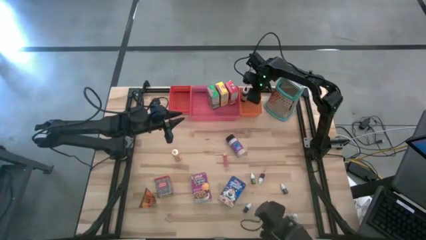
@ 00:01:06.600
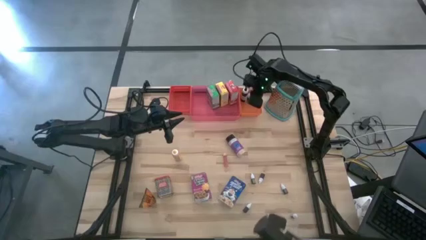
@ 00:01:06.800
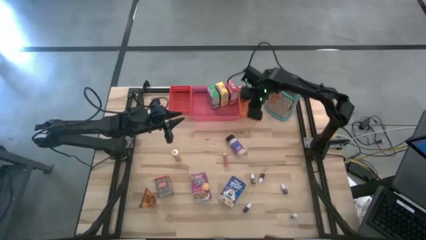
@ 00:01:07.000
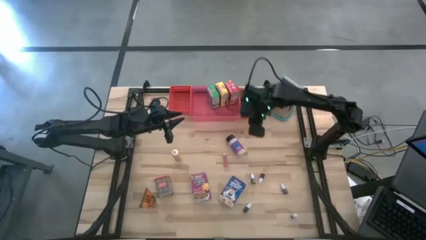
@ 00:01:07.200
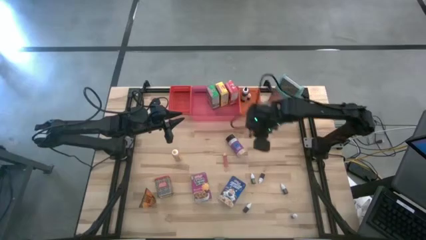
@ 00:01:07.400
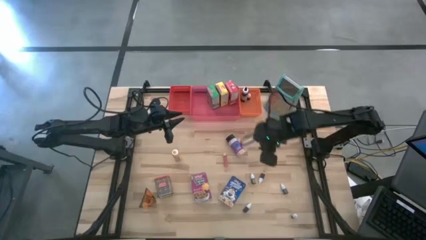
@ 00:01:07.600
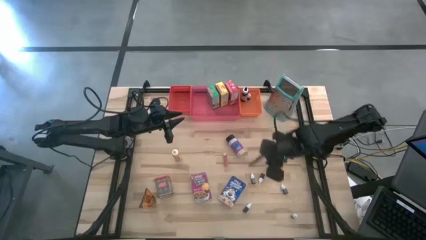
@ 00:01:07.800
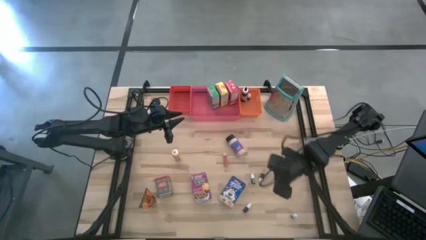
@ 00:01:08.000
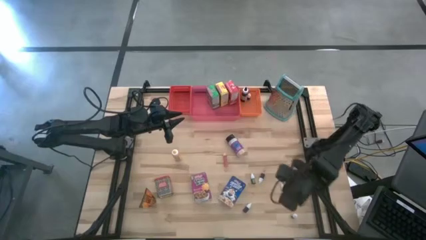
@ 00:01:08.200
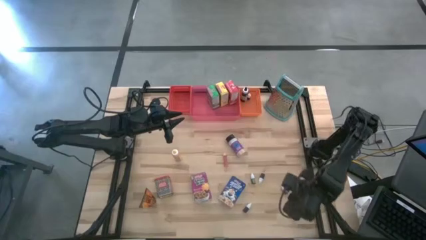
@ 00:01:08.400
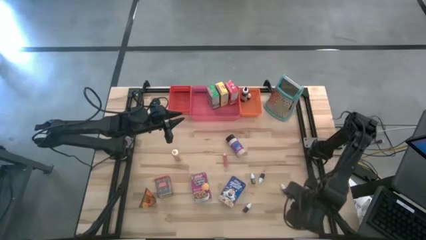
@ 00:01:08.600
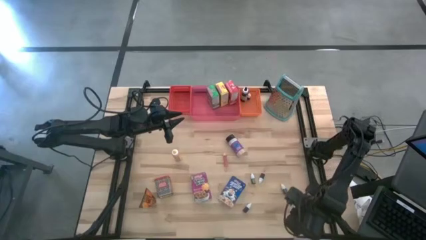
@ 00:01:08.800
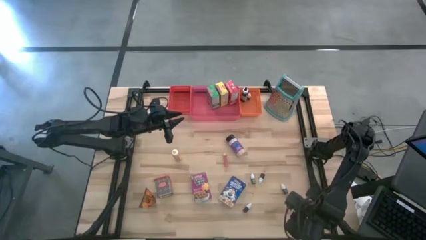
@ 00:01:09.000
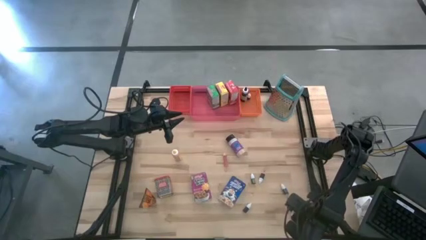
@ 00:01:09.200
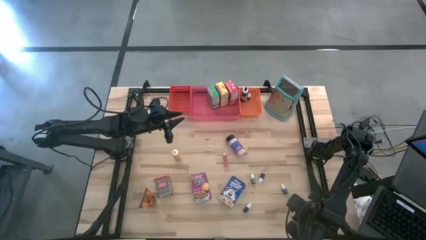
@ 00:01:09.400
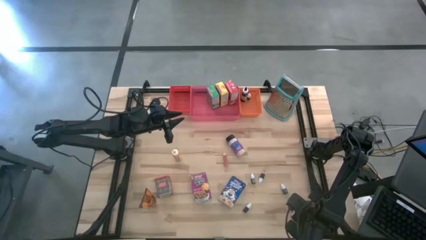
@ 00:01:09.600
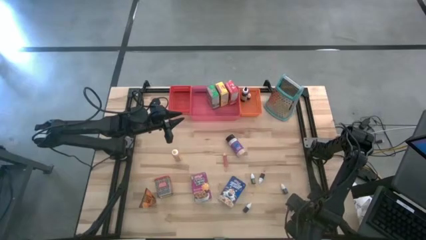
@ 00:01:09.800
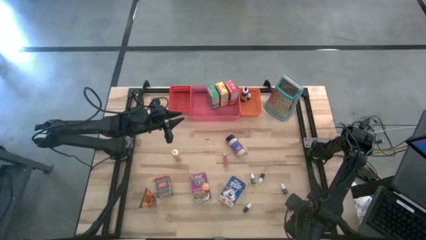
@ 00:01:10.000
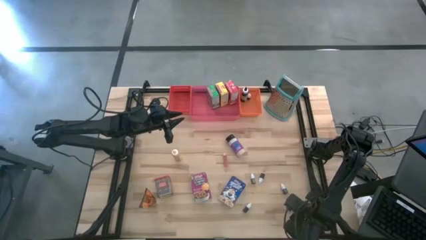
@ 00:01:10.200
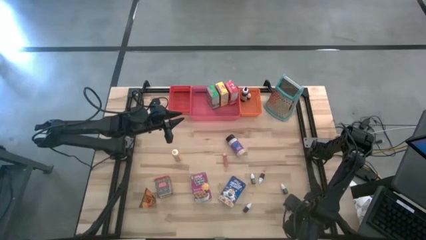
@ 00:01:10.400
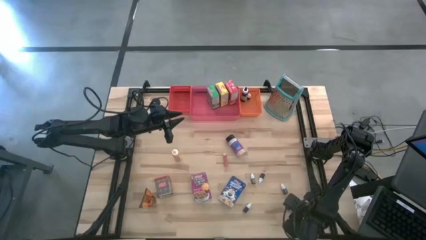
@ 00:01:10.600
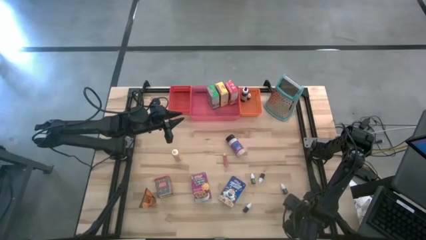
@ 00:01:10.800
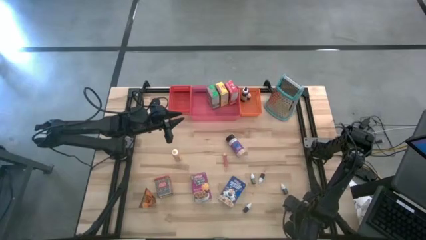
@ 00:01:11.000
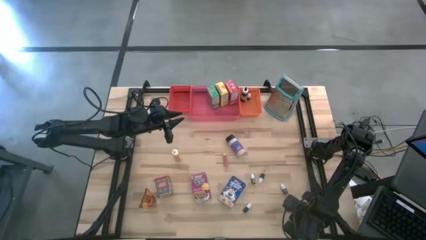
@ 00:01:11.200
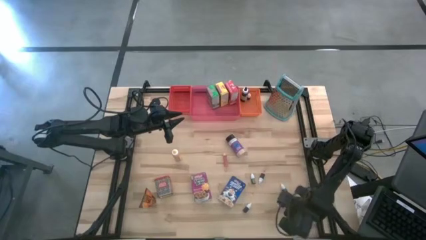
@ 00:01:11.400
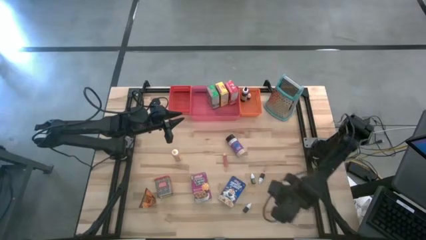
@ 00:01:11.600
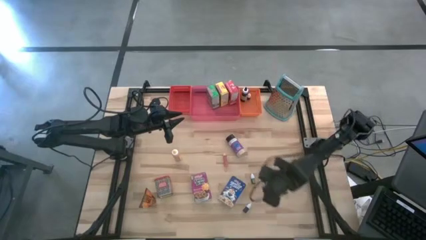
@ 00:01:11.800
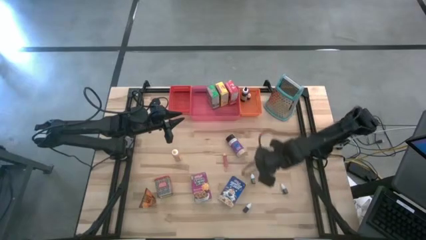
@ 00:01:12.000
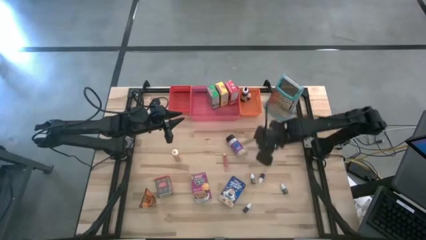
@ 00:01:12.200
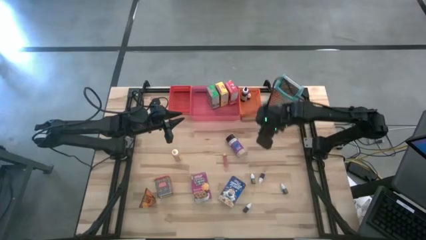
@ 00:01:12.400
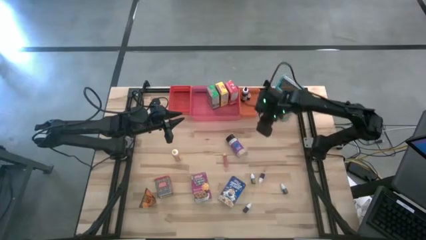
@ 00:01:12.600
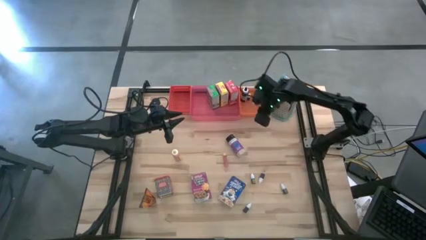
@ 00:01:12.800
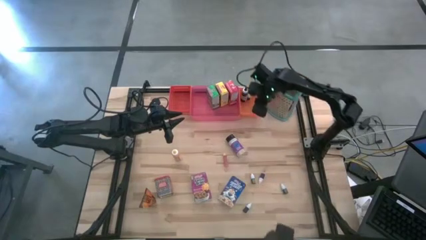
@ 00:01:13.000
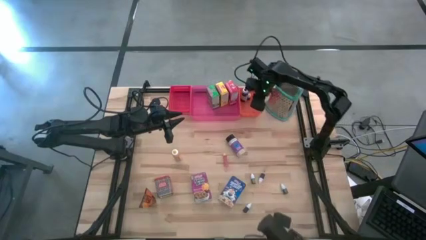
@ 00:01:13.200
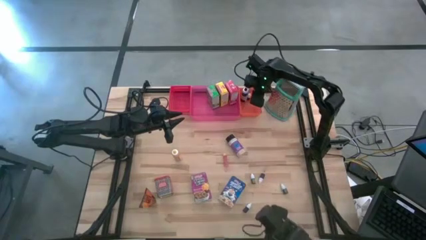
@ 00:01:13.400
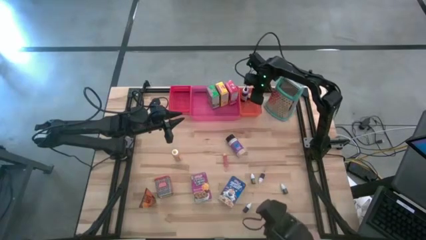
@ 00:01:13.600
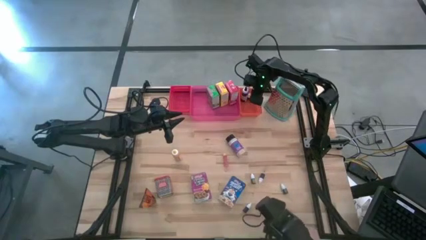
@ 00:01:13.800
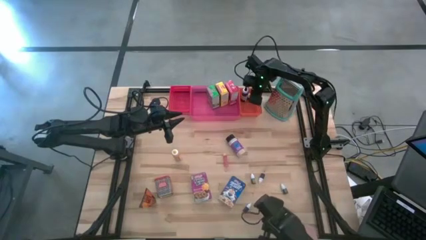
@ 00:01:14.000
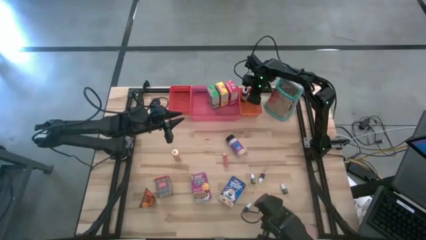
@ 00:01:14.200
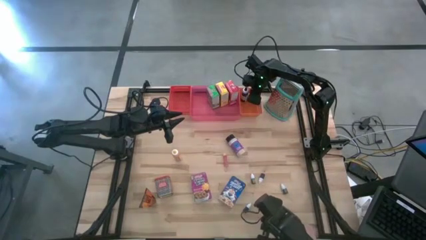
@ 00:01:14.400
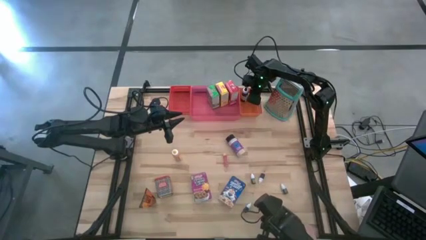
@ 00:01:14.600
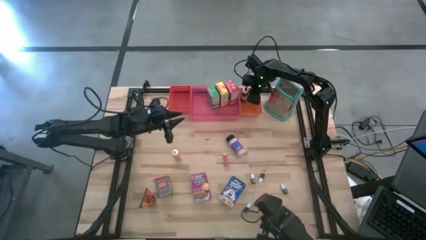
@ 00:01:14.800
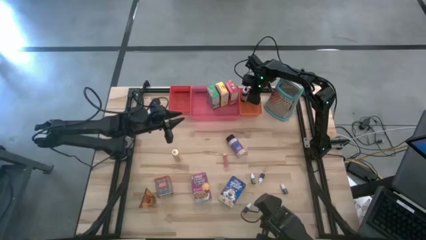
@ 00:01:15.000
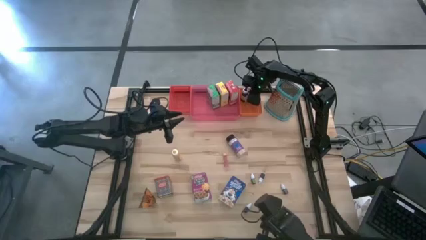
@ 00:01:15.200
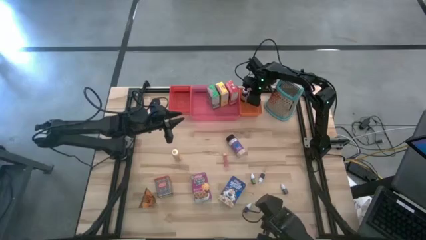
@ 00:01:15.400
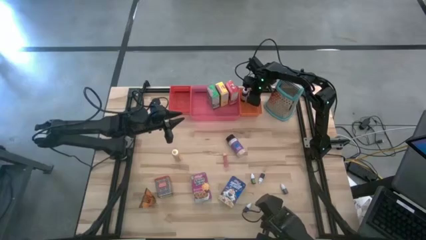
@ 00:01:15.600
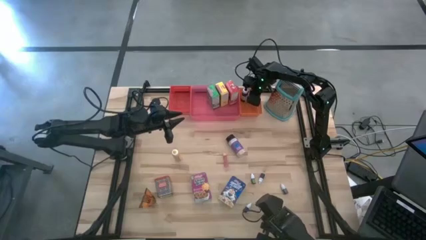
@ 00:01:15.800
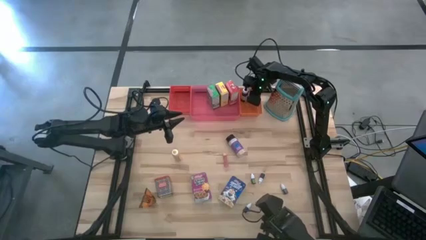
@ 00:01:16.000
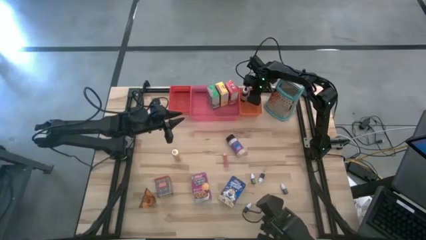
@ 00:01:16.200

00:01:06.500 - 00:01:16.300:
Task: Pick & Place Kitchen Items
Put the small black food coloring bottle into the orange bin
